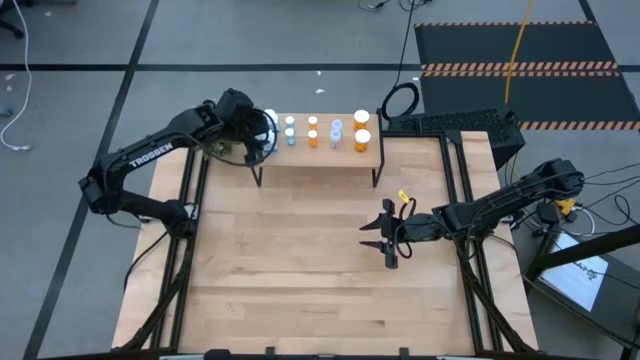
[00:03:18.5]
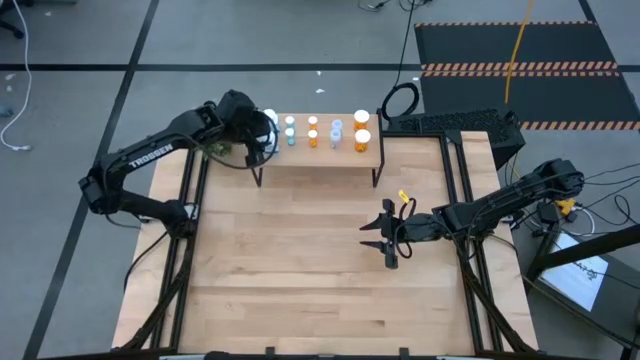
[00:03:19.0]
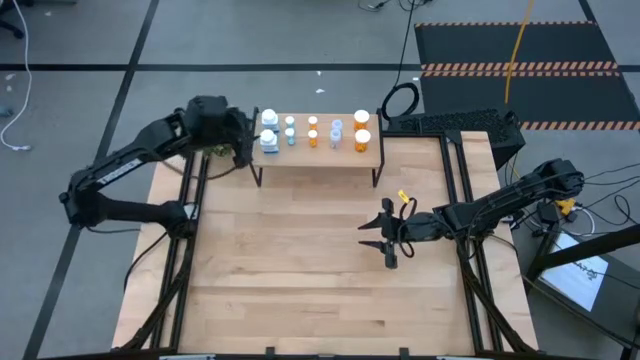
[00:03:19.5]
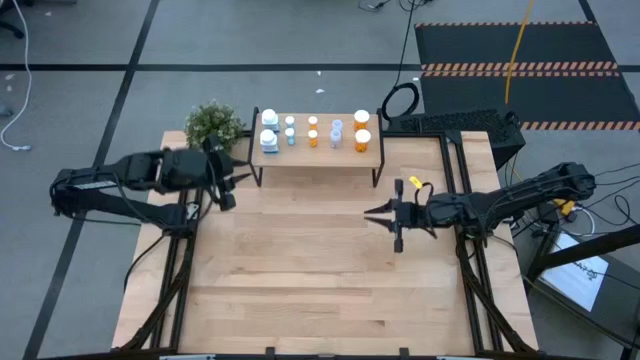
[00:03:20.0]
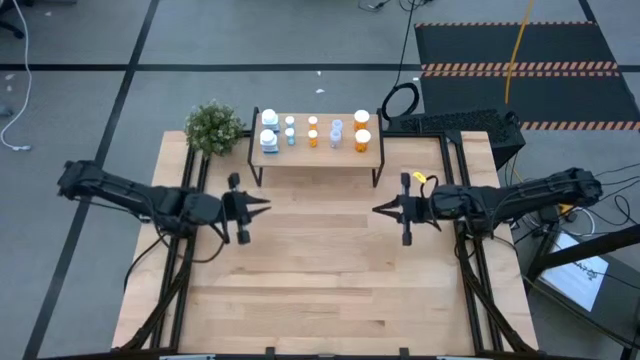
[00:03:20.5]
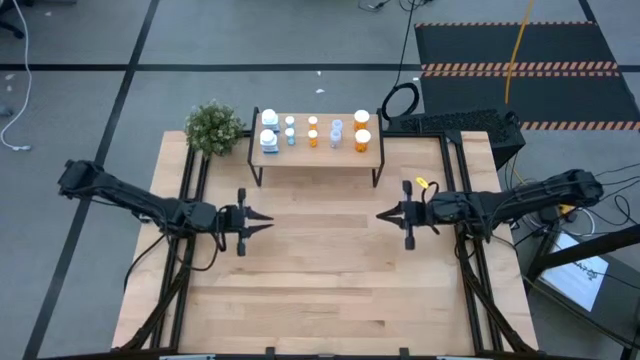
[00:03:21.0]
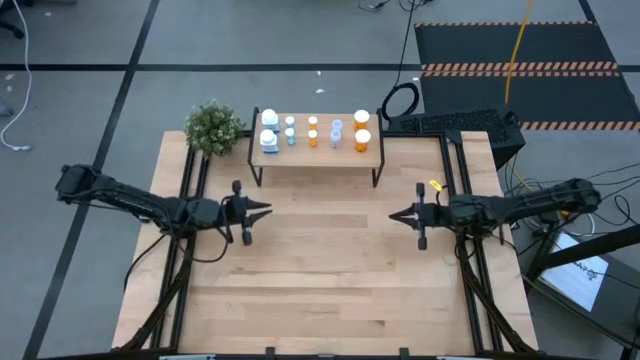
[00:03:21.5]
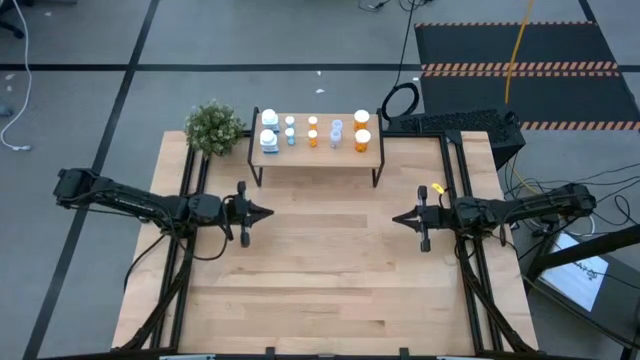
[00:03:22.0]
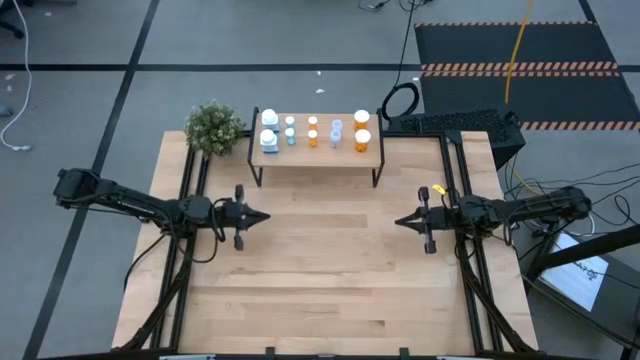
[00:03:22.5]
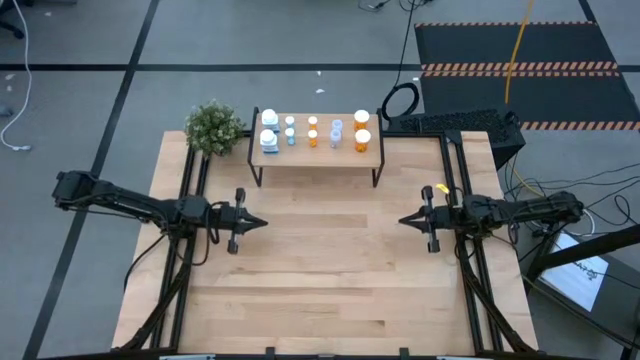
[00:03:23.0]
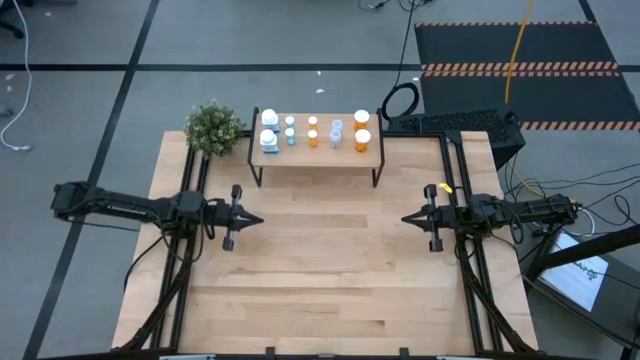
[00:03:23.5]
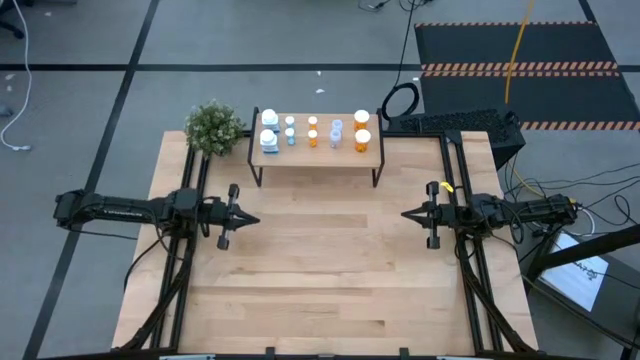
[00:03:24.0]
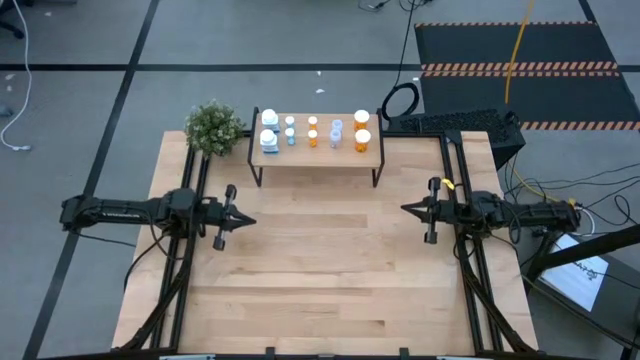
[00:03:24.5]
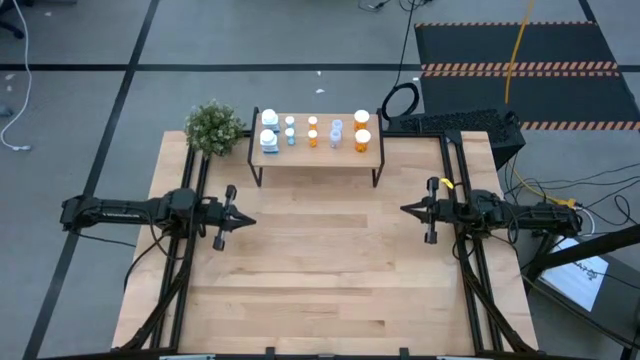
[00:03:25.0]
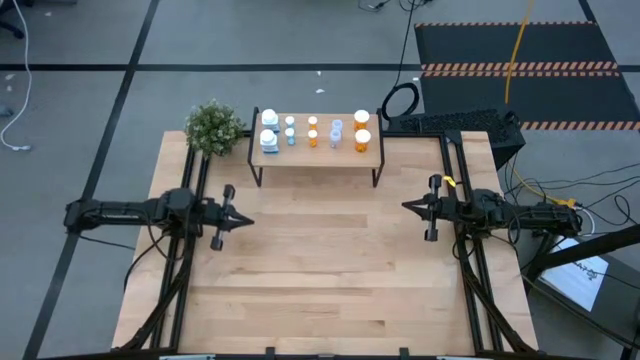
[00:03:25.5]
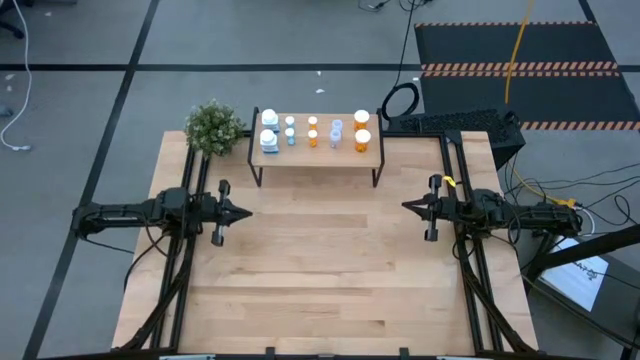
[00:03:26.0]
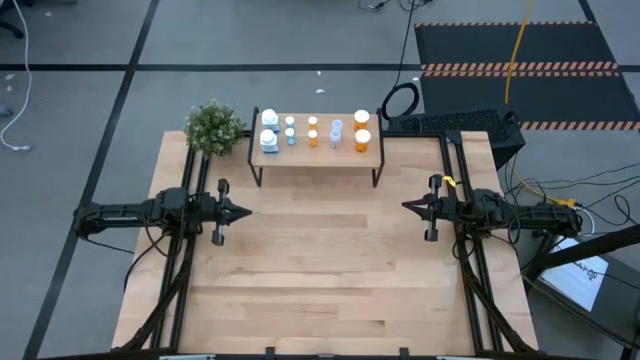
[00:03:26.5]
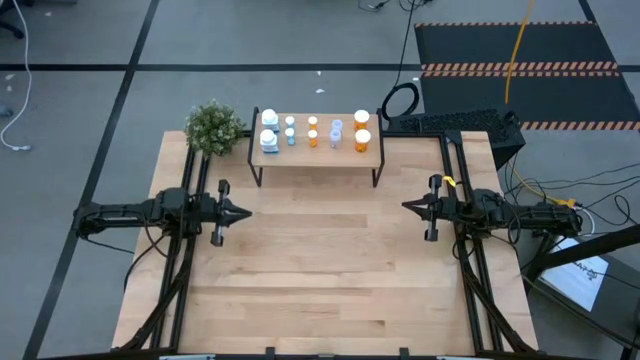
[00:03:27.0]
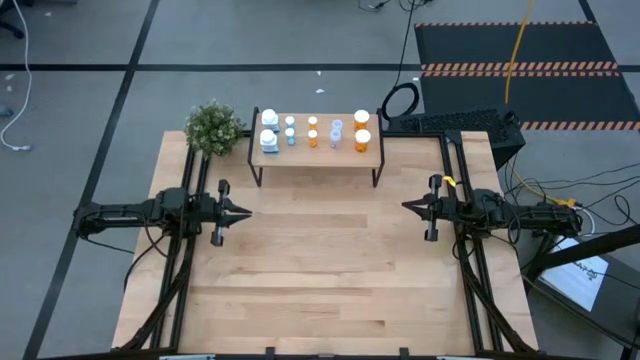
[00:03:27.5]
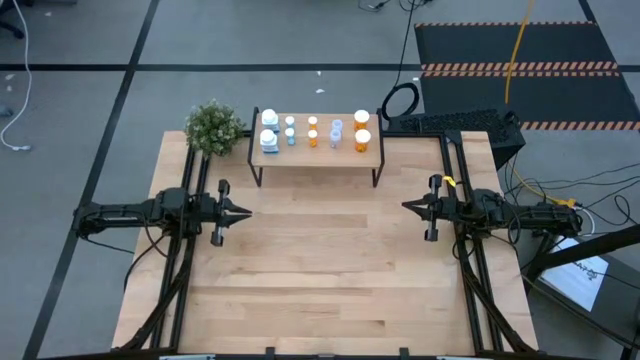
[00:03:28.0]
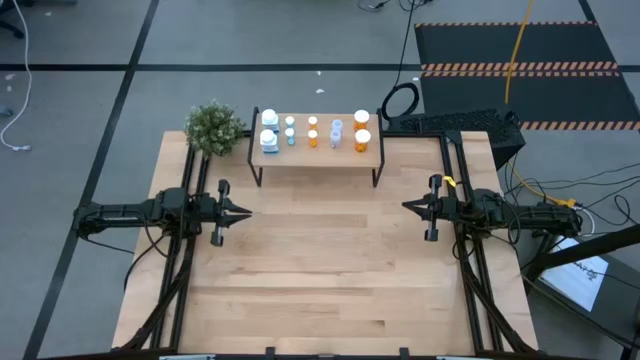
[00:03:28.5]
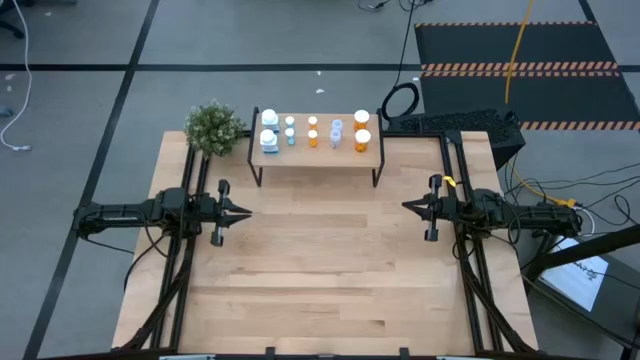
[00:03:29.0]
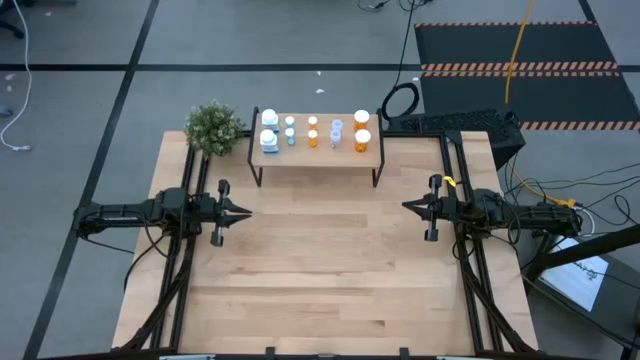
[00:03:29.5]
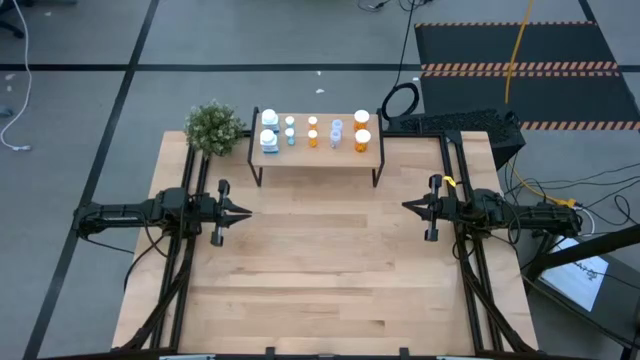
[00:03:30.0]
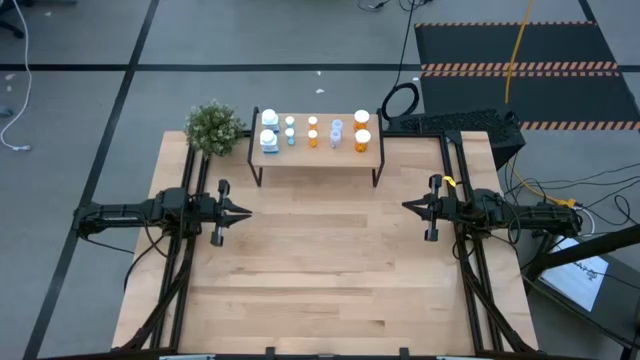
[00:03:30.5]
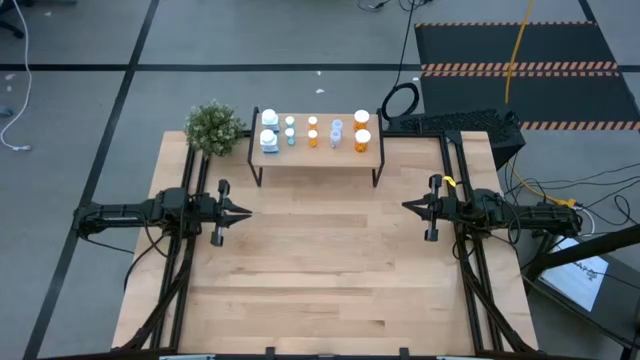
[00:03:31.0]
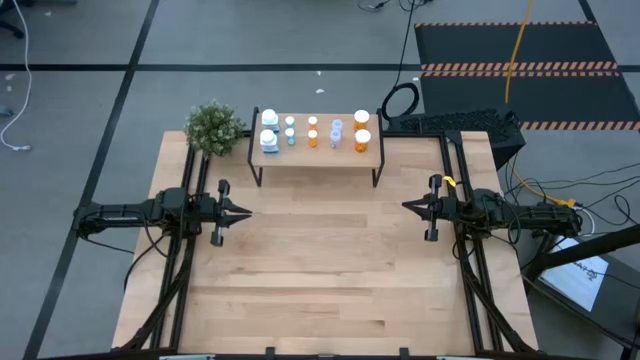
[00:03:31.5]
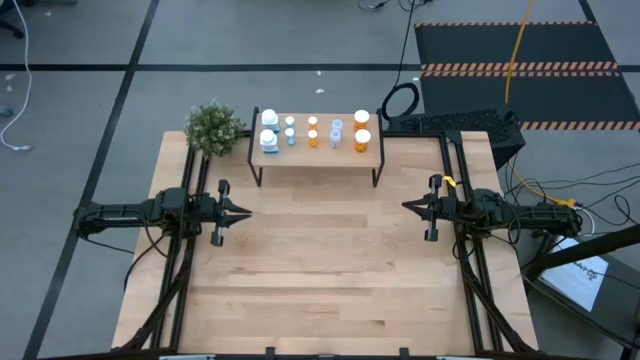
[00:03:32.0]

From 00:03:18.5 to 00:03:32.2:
Task: Pick and place medicine bottles onto shelf by color
Return to Home Position

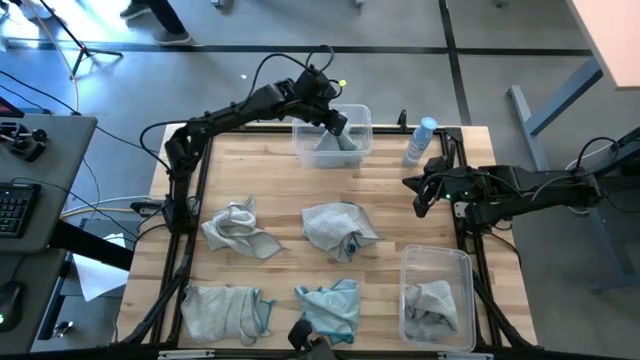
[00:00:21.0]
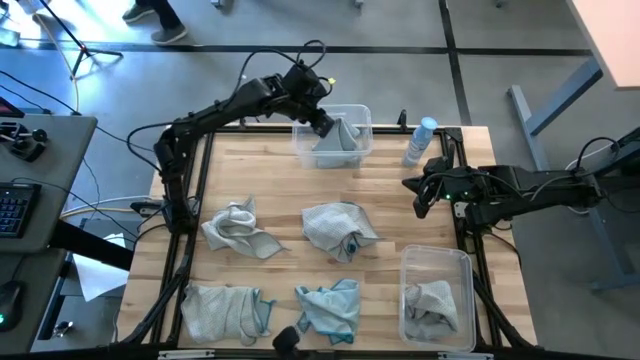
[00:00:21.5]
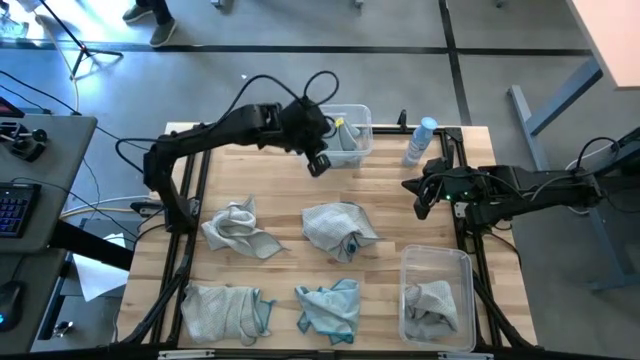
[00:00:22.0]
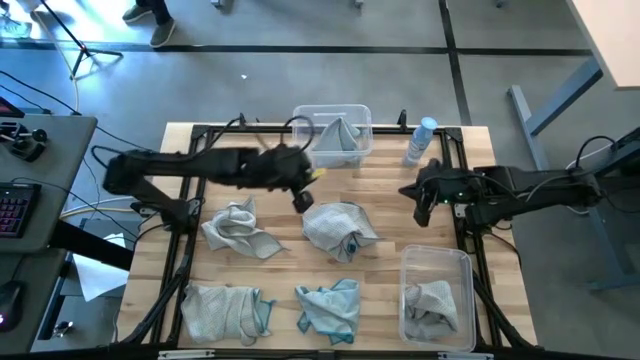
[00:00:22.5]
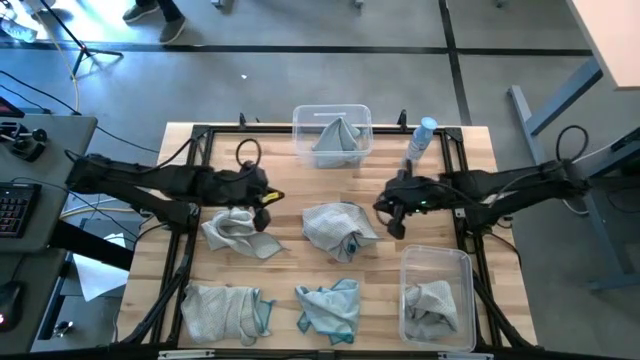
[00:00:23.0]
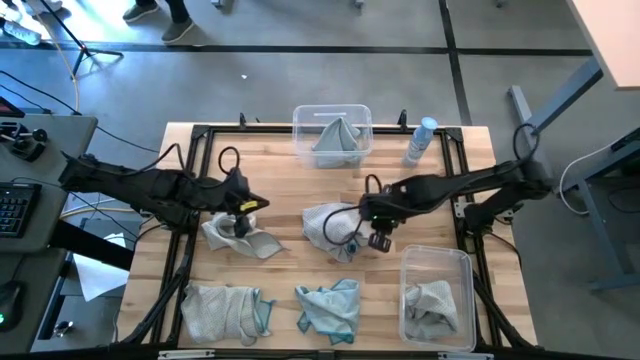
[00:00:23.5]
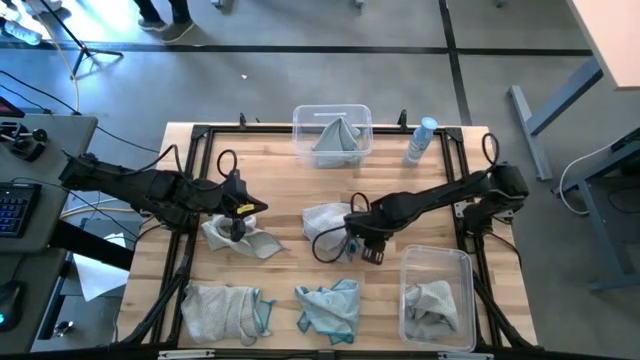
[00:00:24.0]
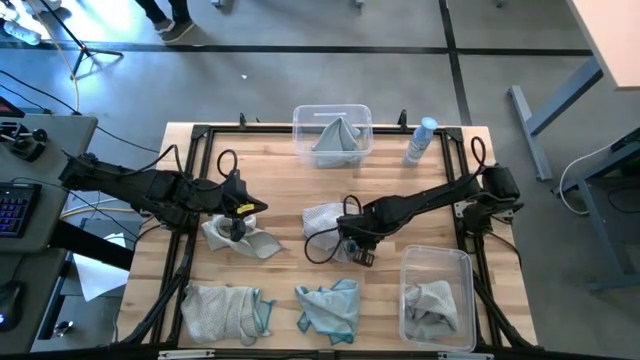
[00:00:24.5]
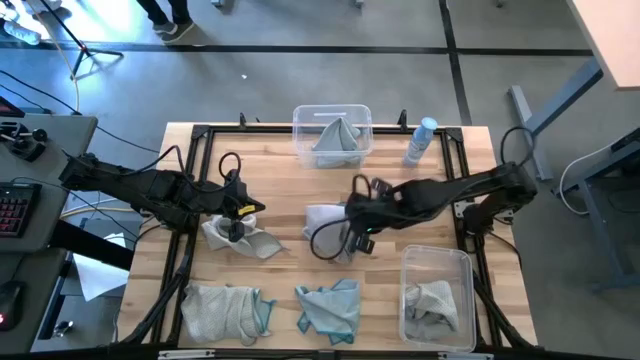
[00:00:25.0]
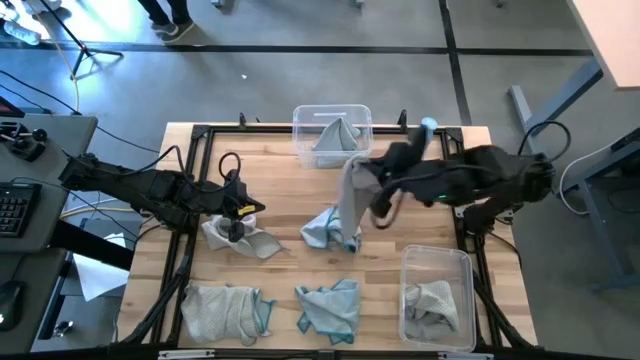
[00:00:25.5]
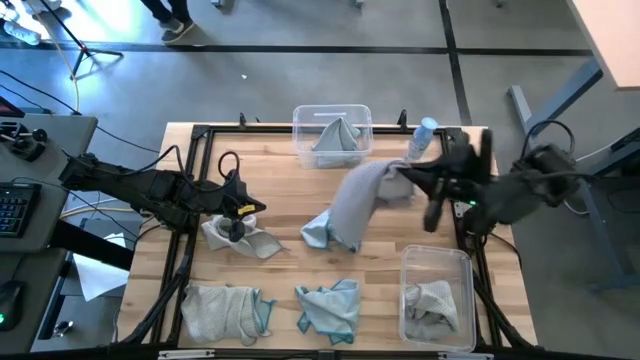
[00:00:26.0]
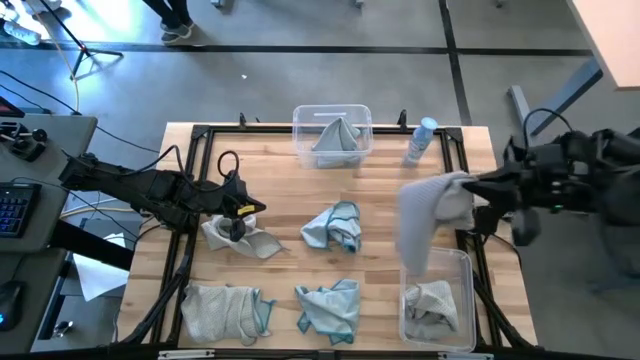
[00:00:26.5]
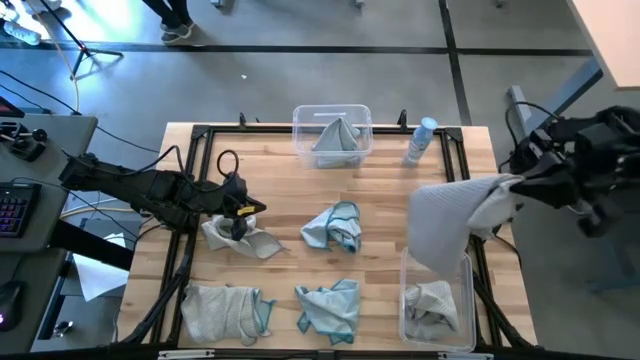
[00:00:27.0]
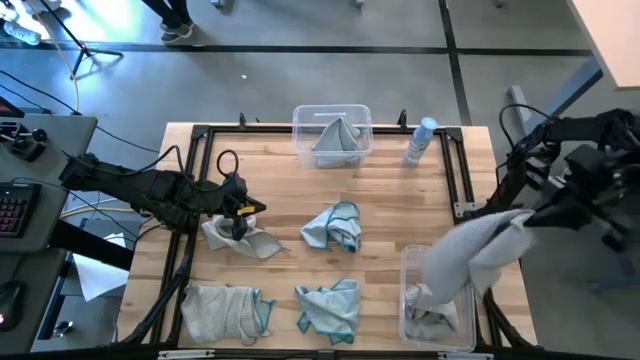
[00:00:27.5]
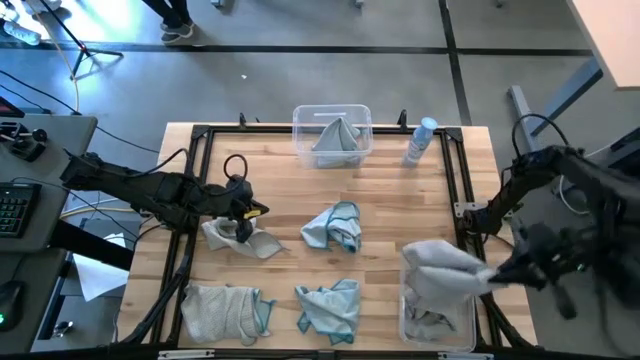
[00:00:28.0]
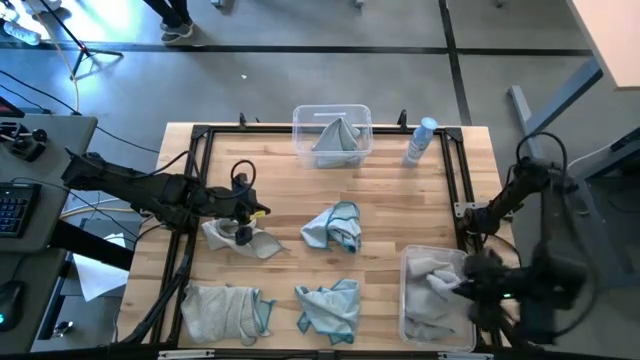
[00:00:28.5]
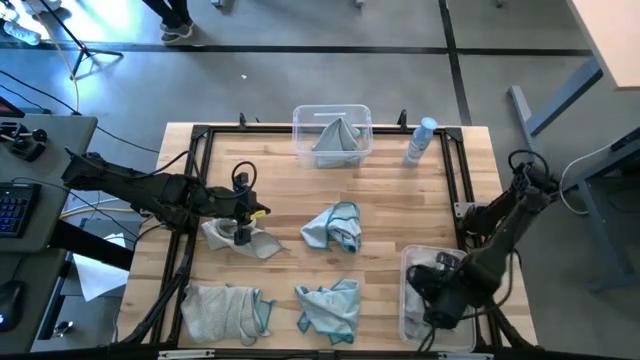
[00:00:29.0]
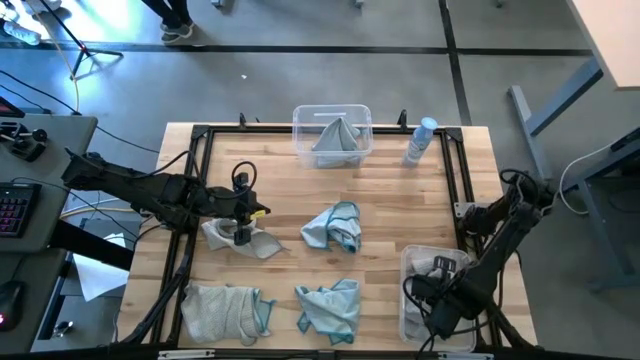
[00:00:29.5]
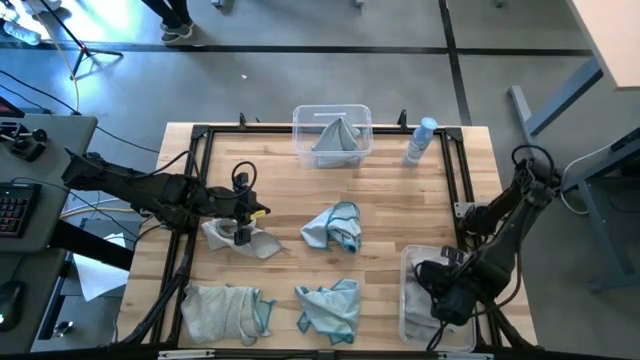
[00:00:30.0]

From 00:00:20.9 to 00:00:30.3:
Task: Sort microfiber towel by color & place in baskets
Put the gray microfiber towel into the bottom transparent bin
